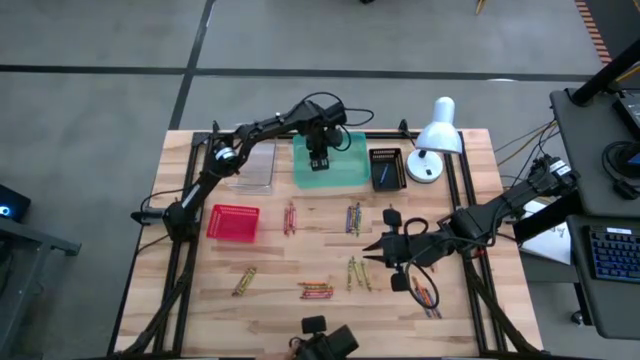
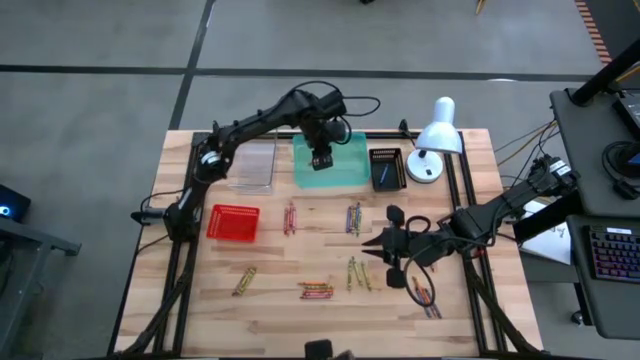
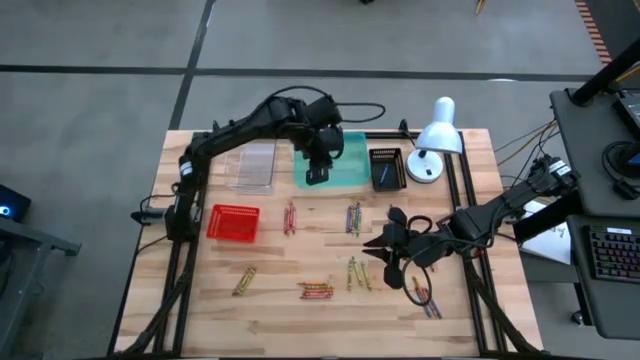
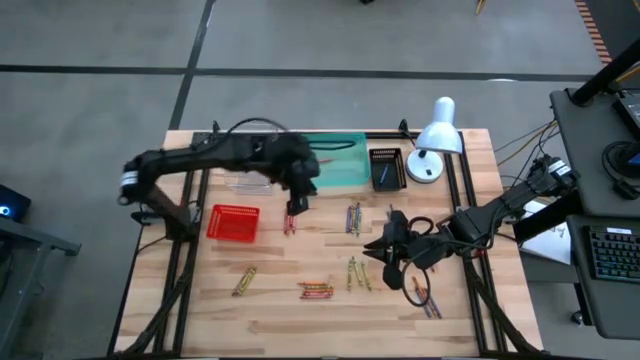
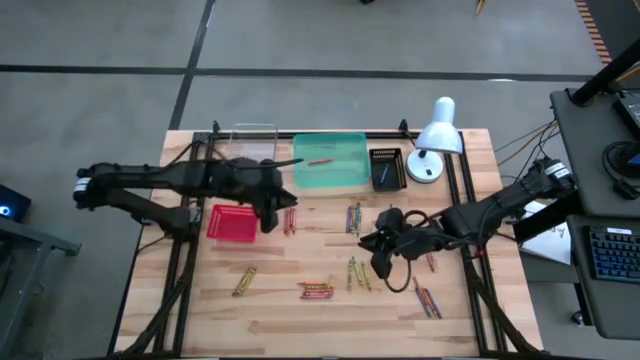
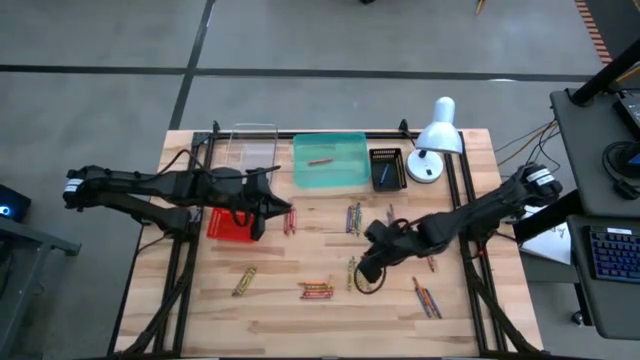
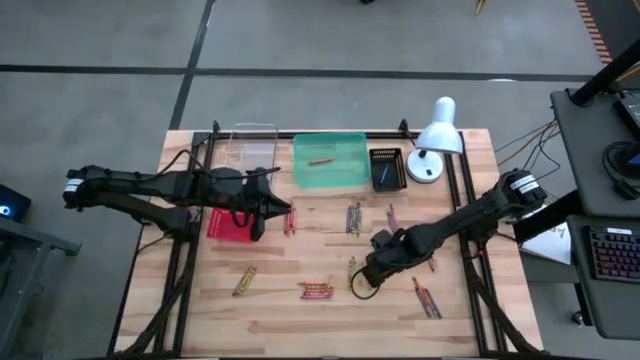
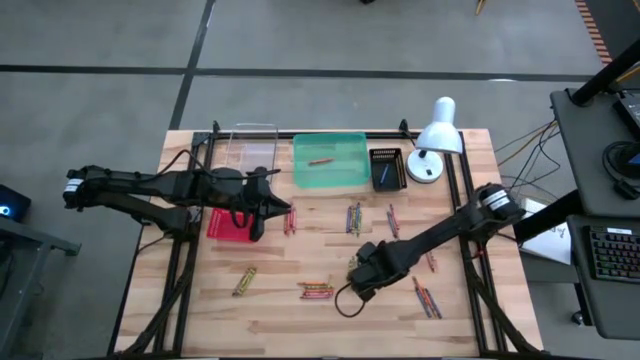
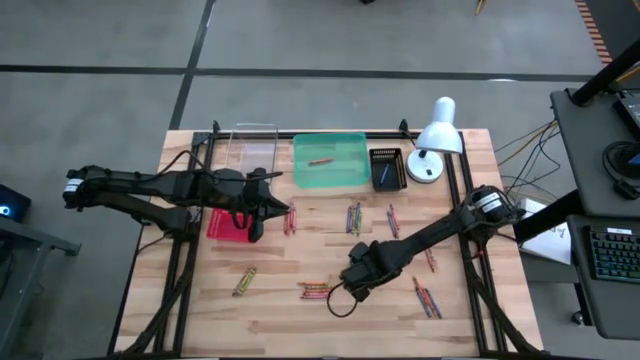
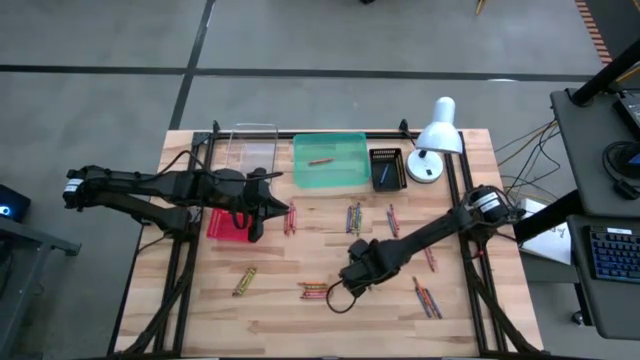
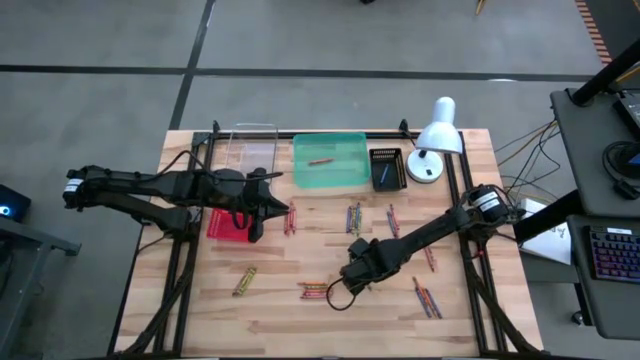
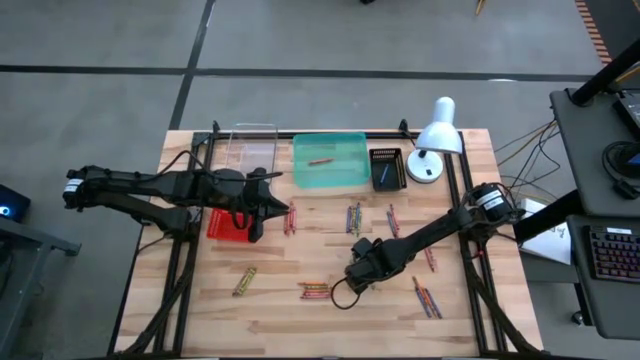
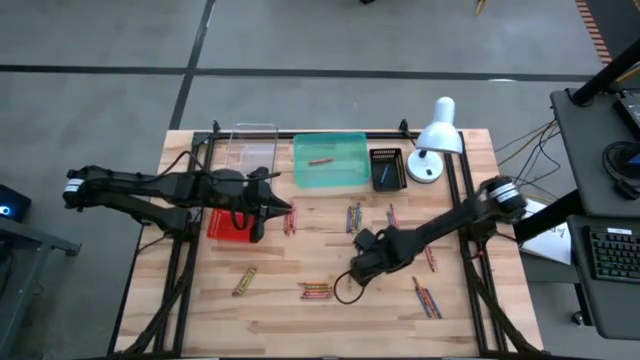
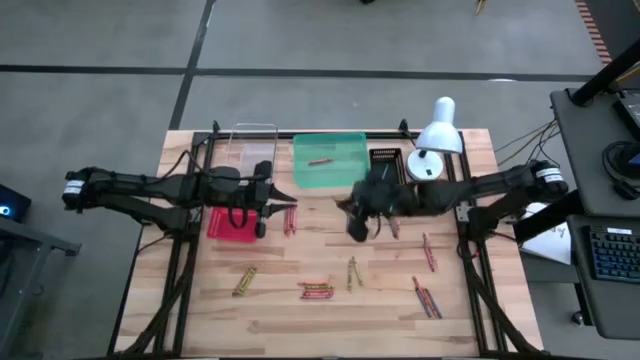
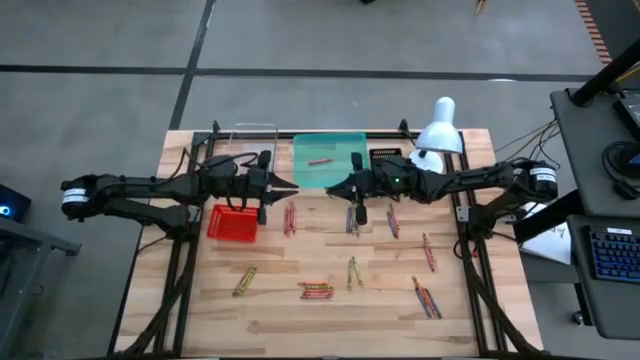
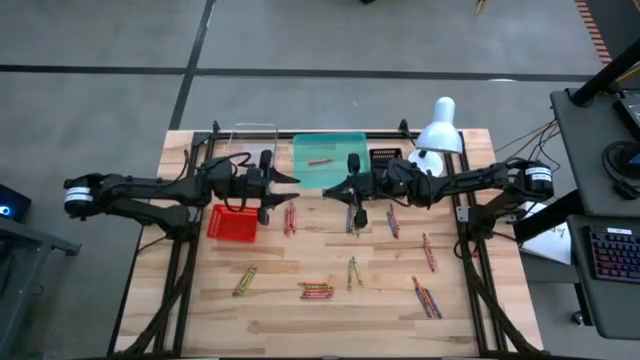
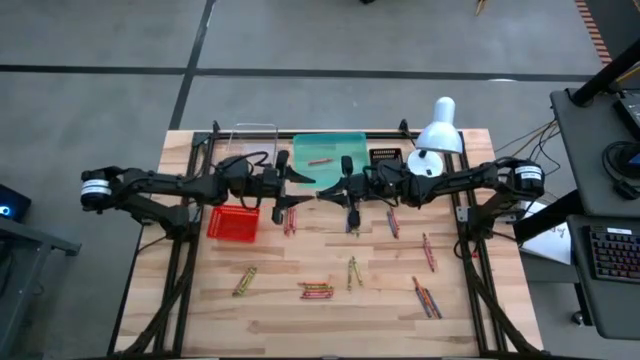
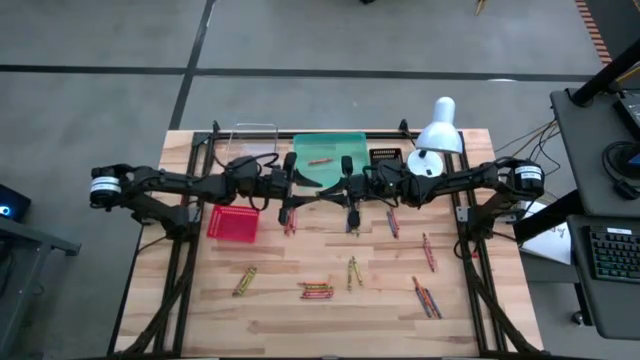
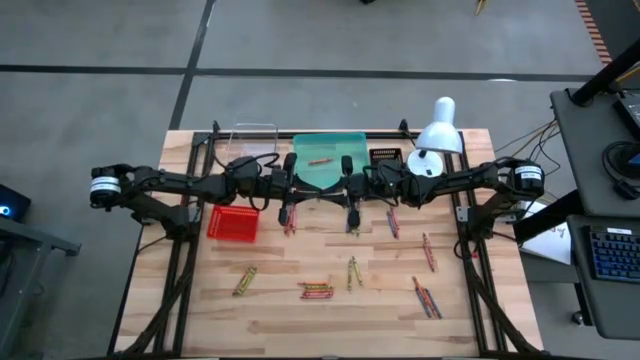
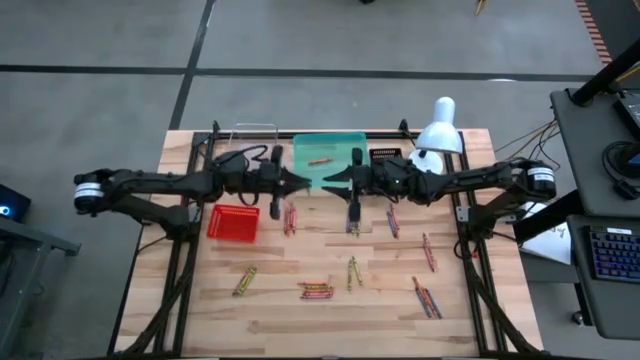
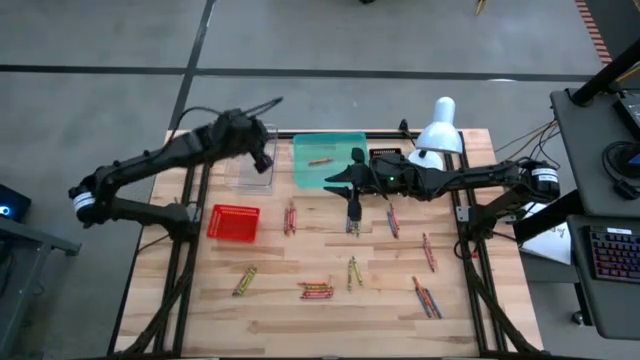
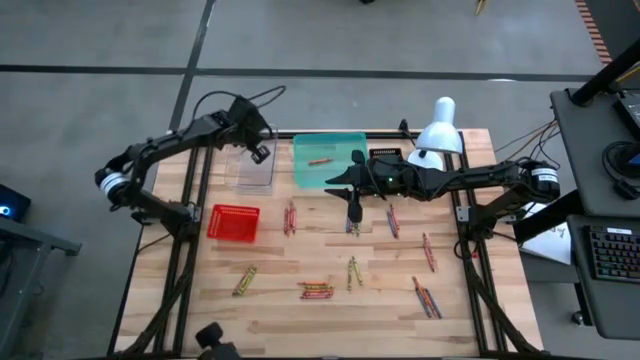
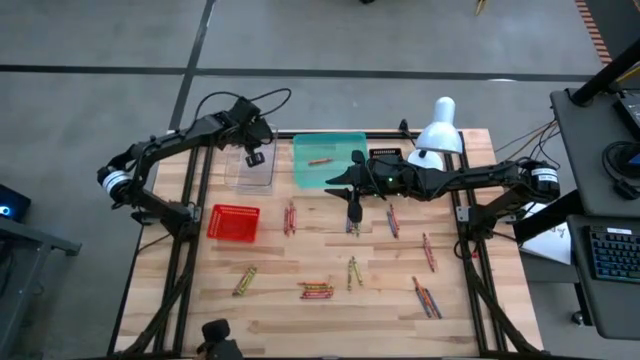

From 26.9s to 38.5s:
Task: Sort crayons
Put the green crayon into the transparent bin

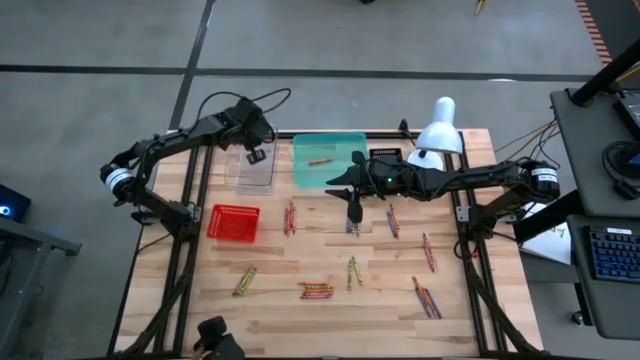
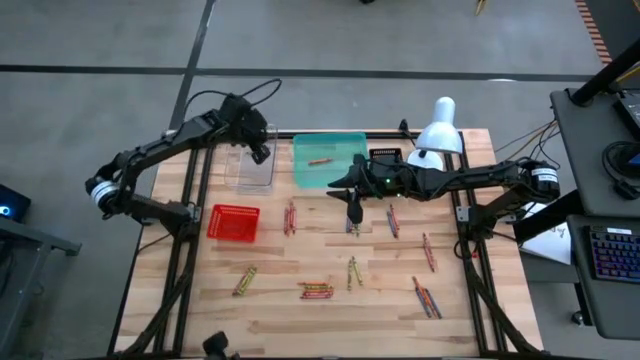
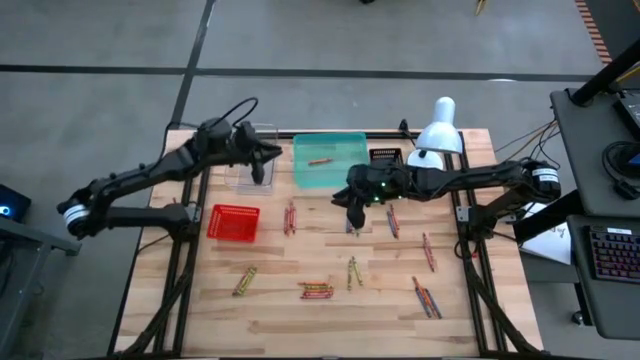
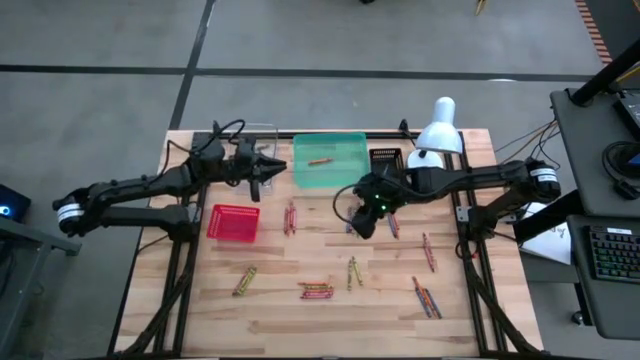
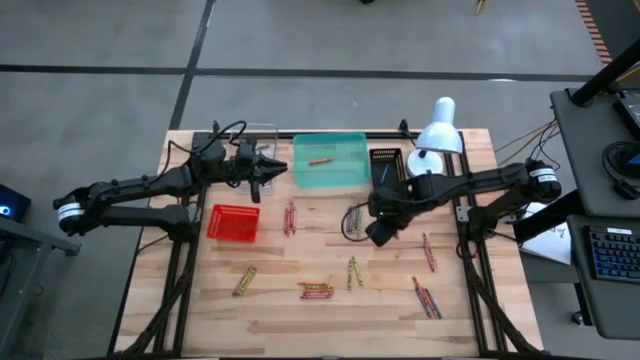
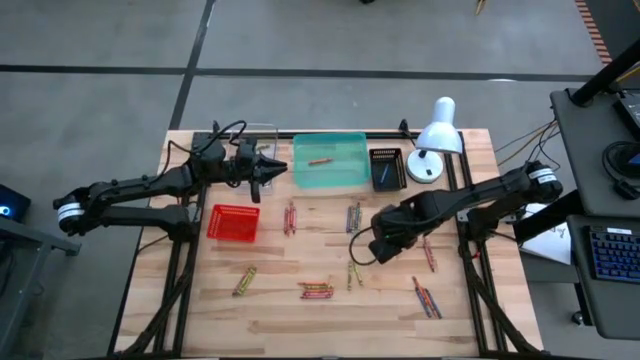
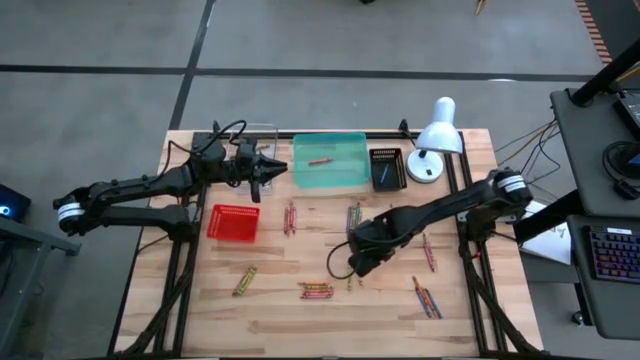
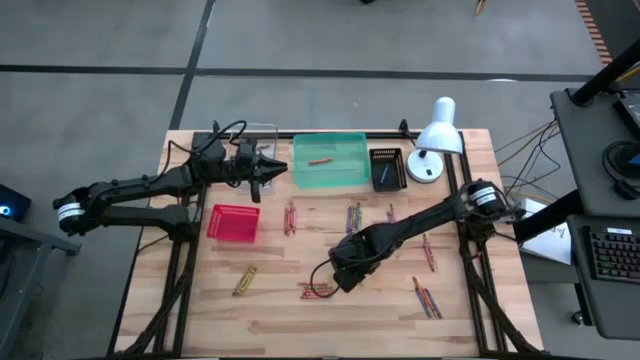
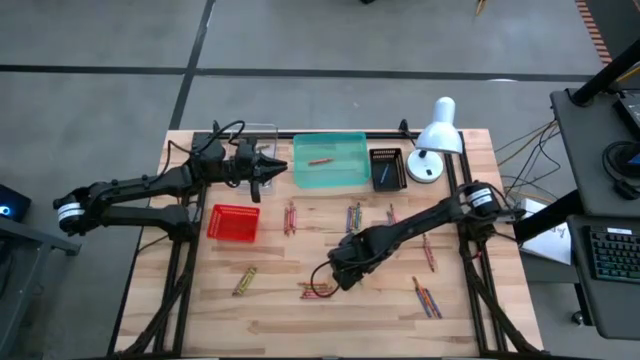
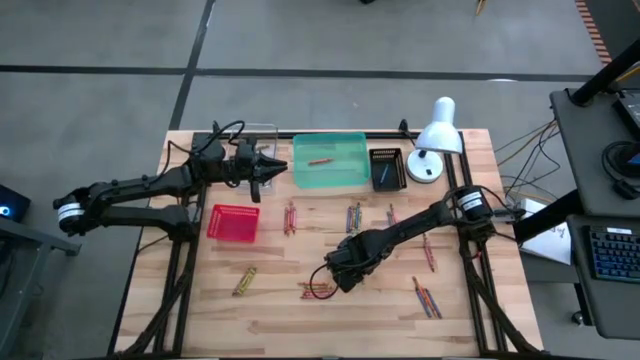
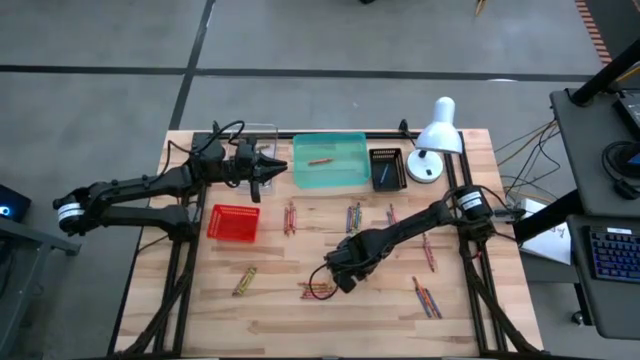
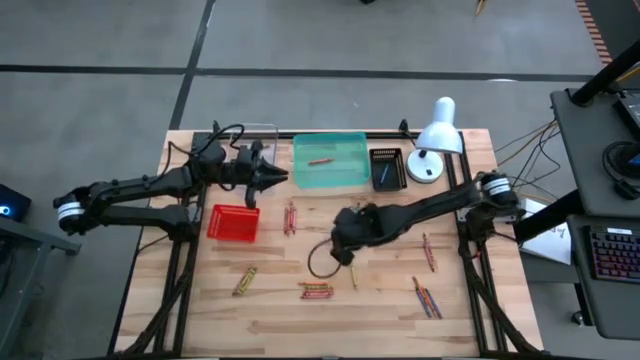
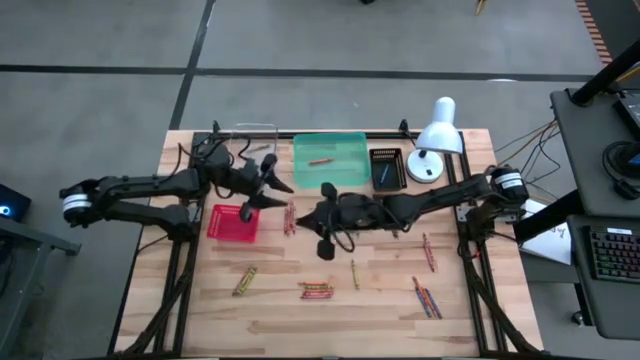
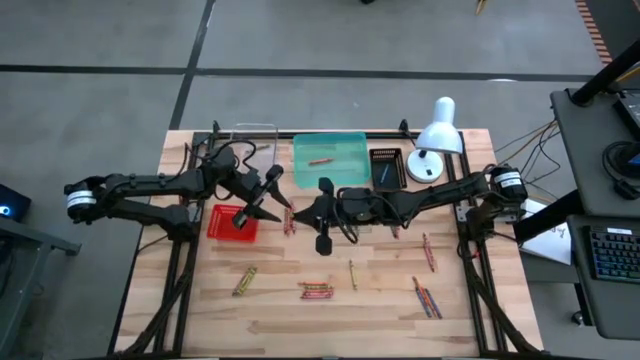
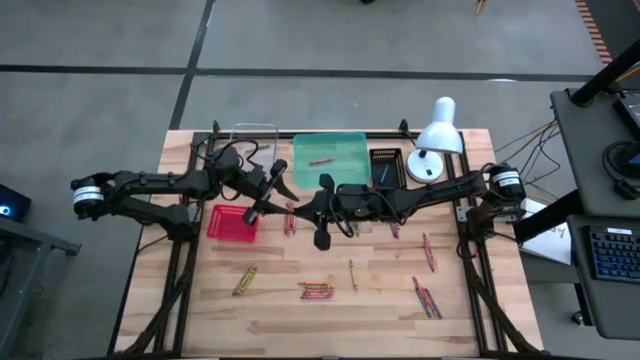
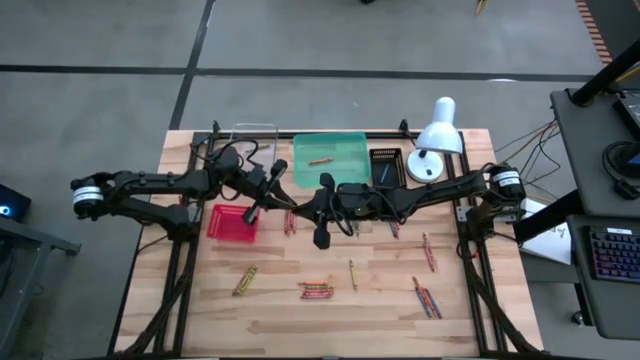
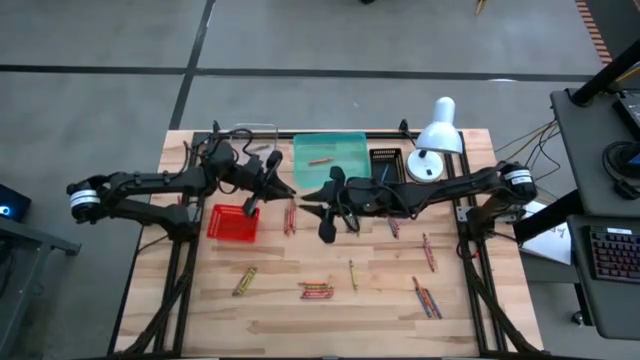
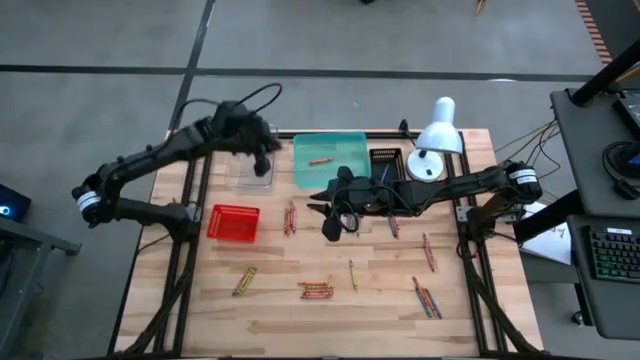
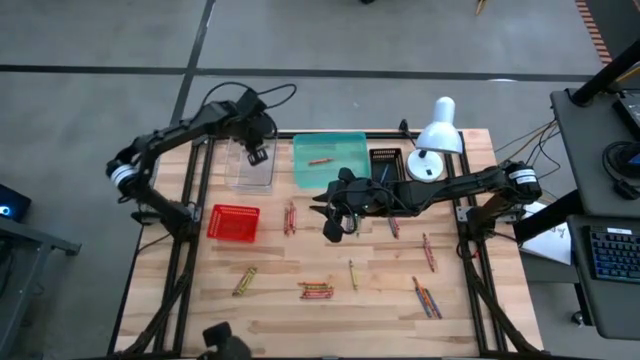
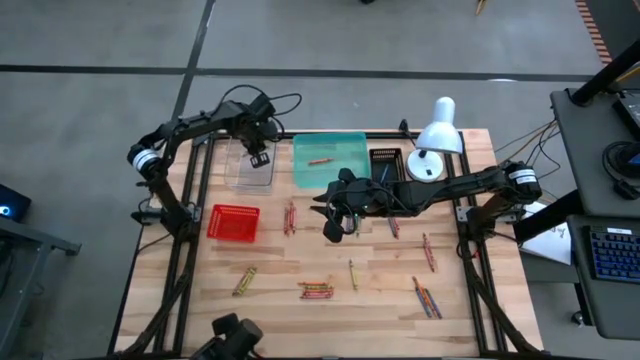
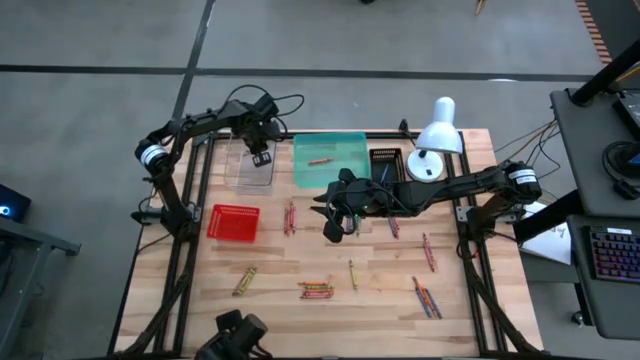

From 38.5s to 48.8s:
Put the green crayon into the transparent bin
